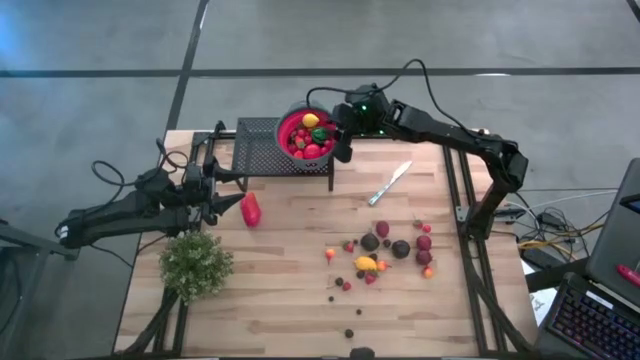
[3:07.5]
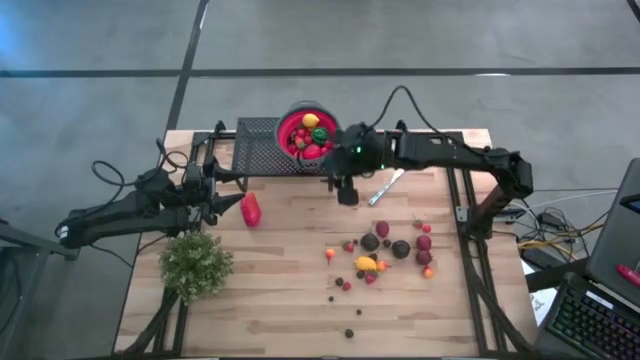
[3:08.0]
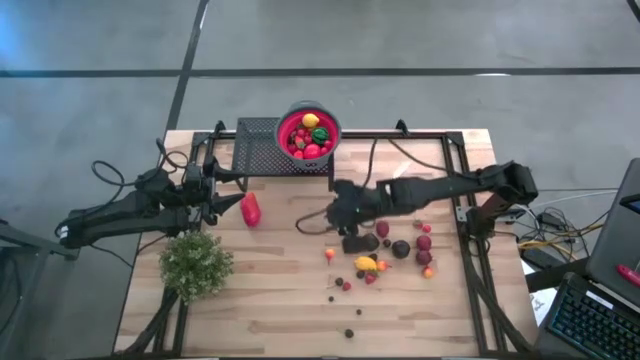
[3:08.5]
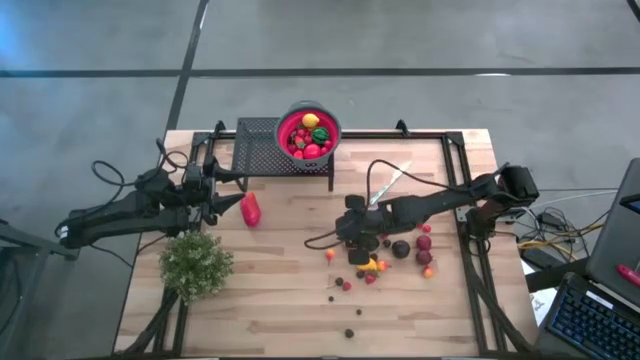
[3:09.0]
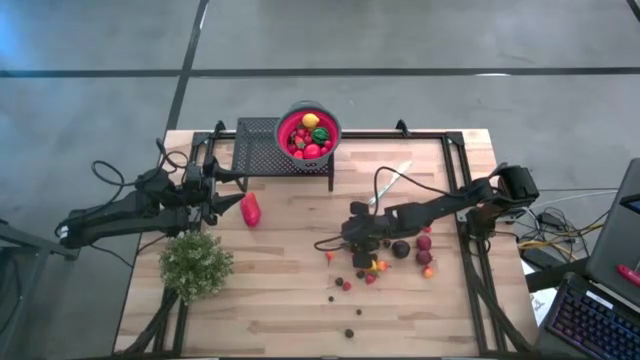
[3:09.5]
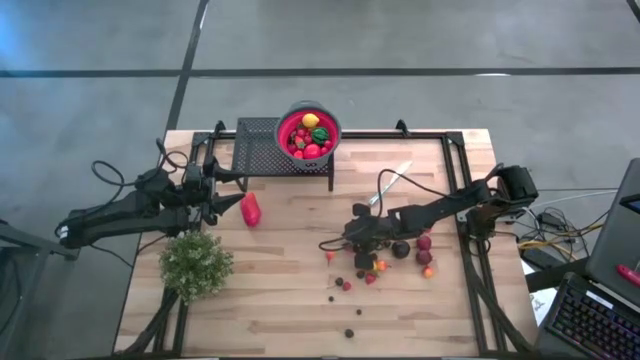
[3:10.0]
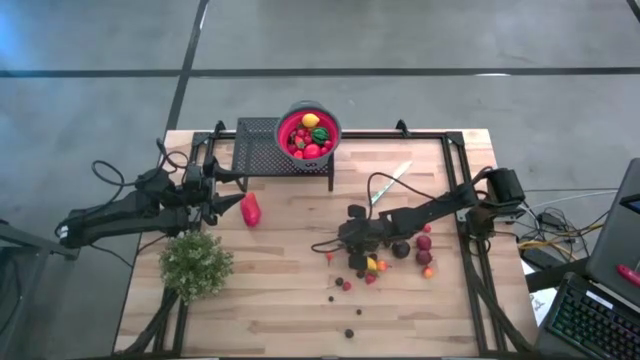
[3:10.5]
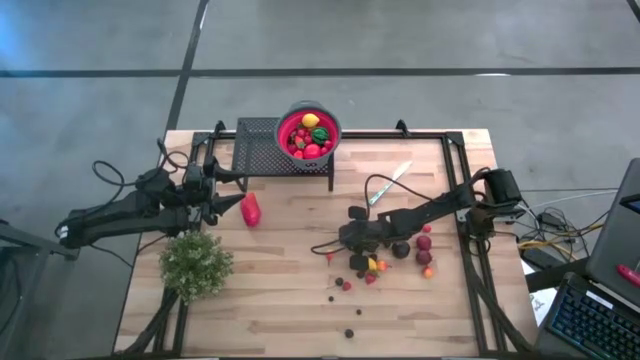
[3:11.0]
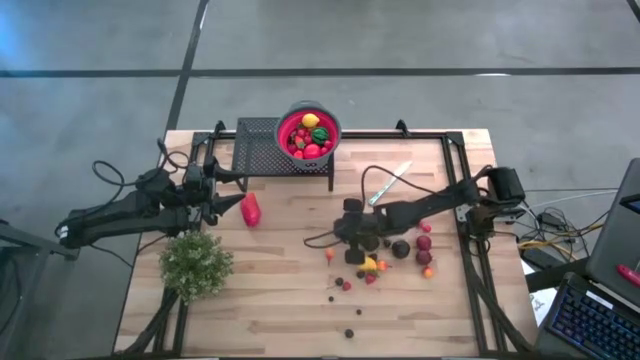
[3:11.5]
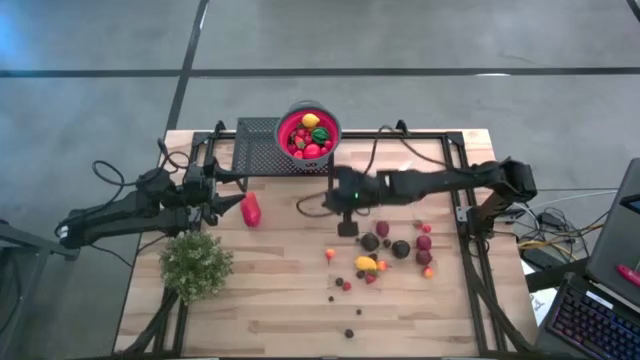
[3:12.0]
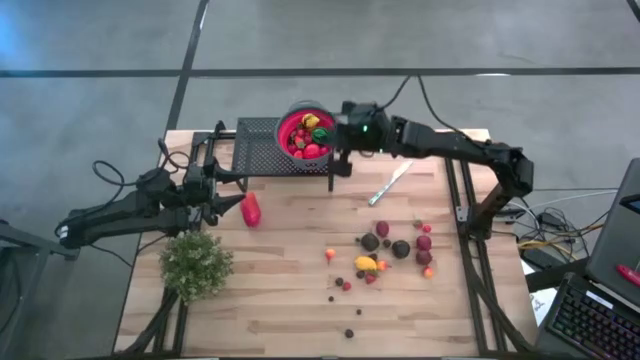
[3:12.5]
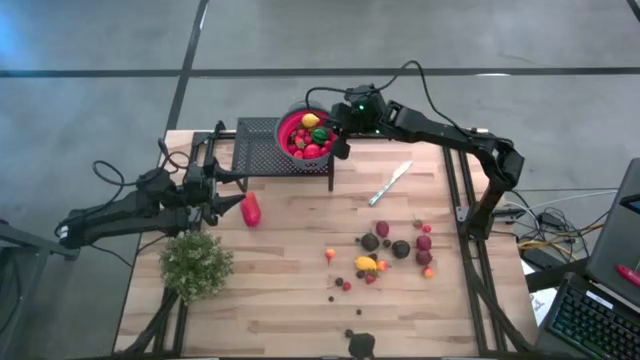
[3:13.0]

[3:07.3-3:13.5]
Task: Pick & Place Fruit
Put the red strawberry into the red gray strainer bowl on the shelf

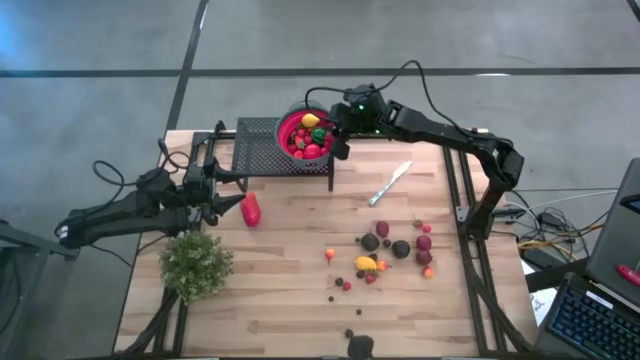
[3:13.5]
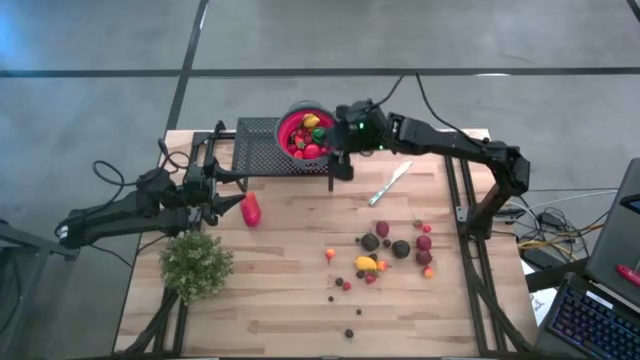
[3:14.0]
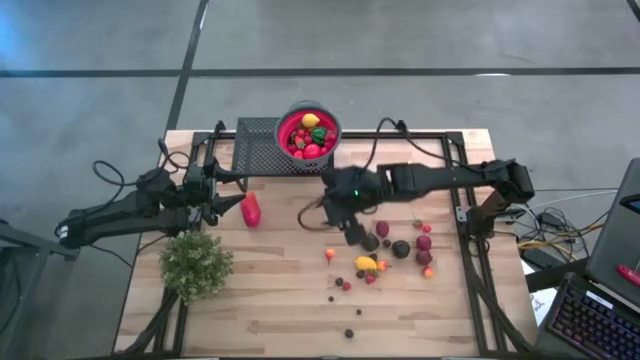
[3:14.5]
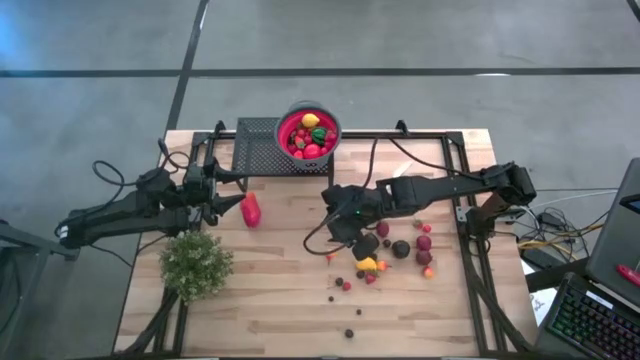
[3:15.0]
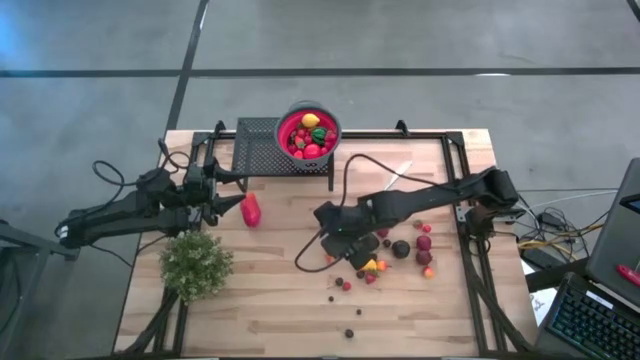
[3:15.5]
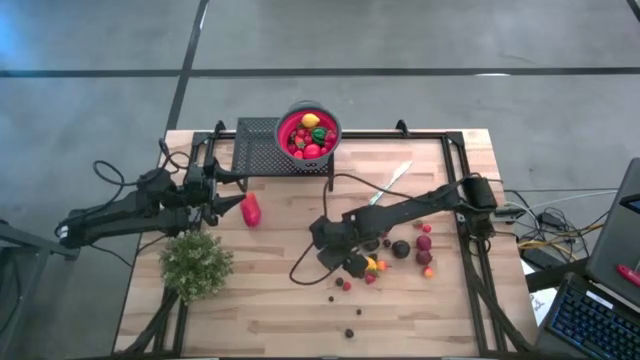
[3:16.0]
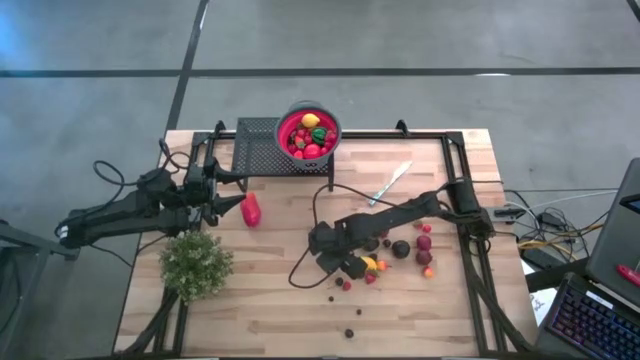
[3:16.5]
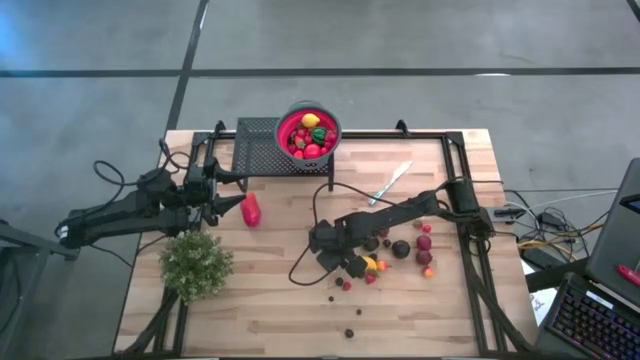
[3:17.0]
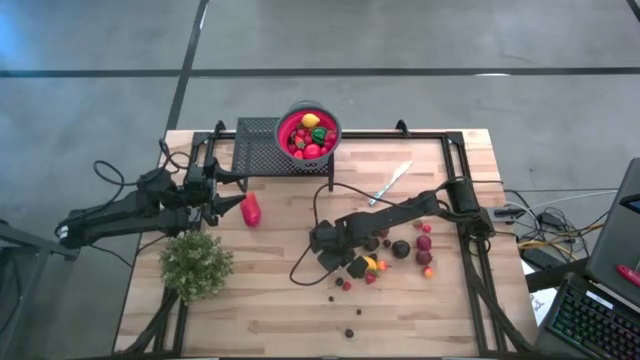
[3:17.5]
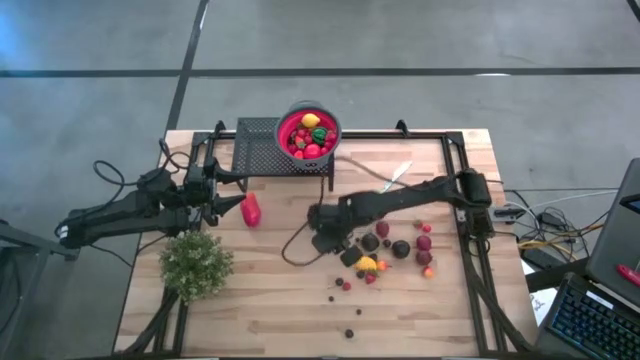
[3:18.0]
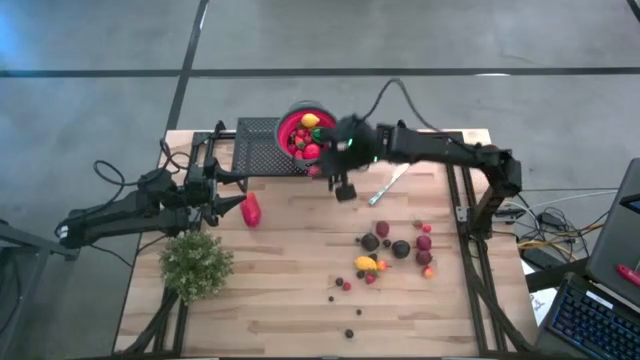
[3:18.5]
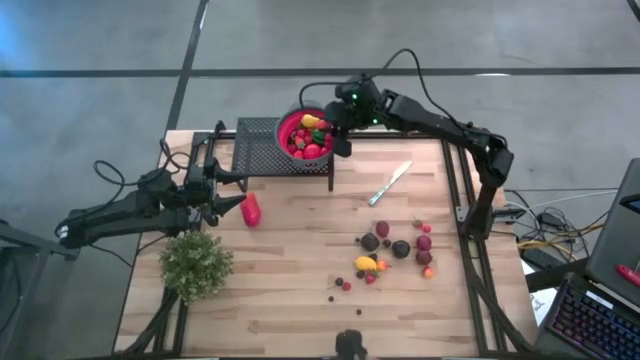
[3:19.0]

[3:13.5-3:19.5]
Put the orange pear into the red gray strainer bowl on the shelf

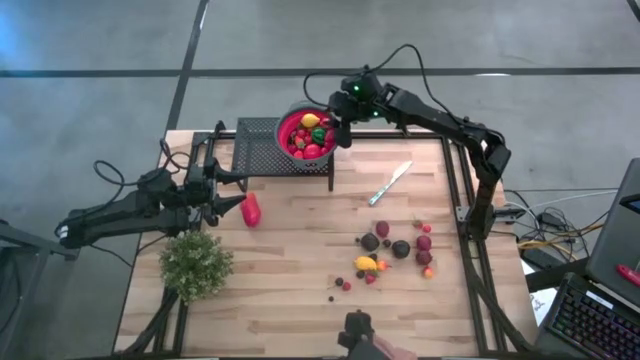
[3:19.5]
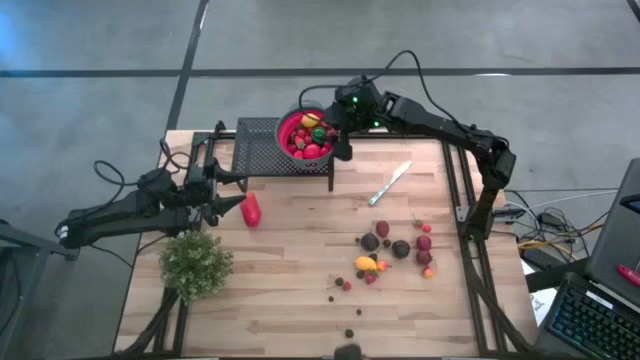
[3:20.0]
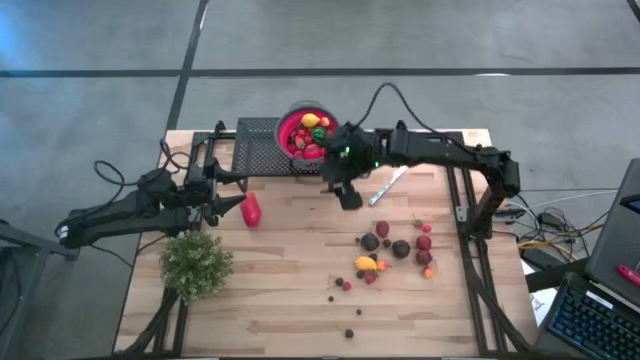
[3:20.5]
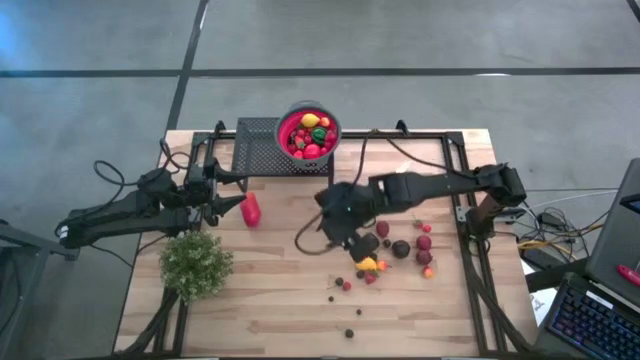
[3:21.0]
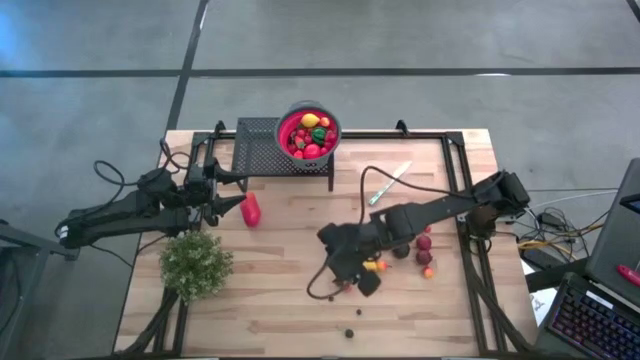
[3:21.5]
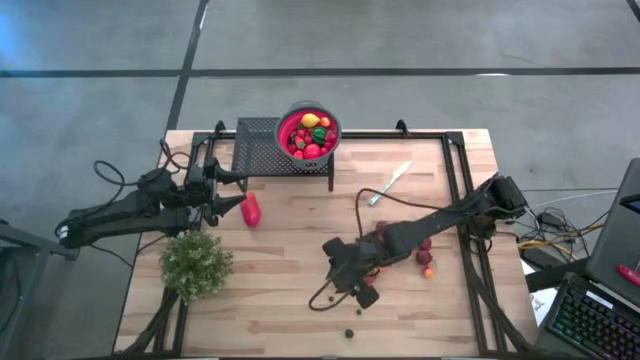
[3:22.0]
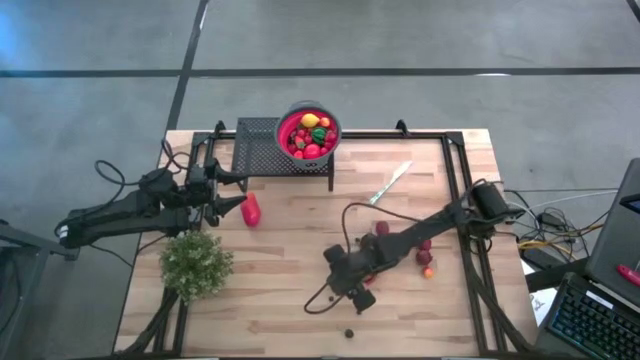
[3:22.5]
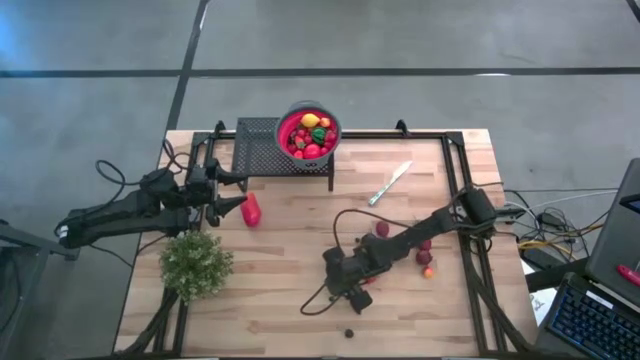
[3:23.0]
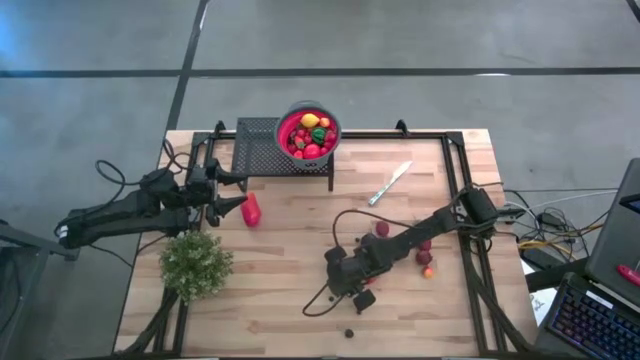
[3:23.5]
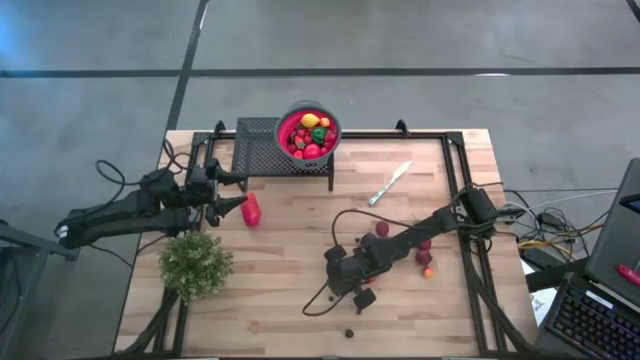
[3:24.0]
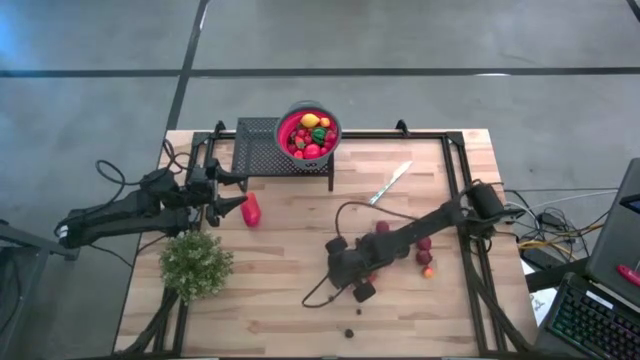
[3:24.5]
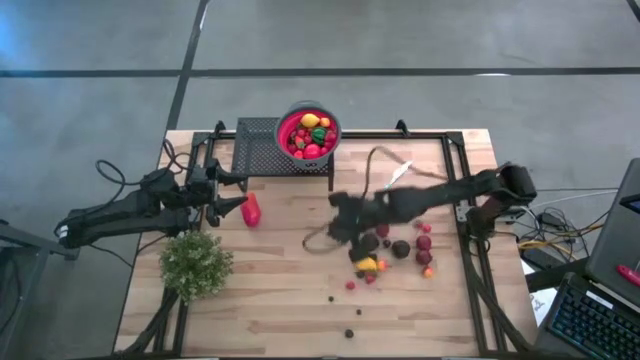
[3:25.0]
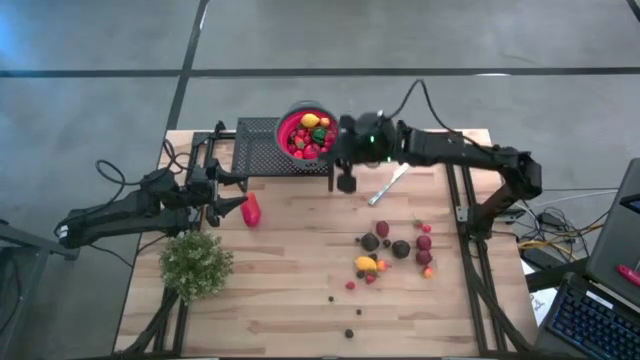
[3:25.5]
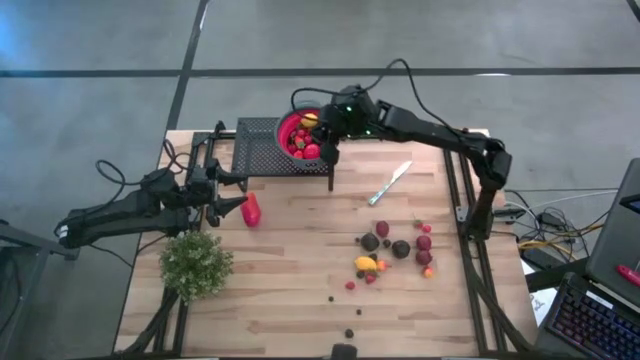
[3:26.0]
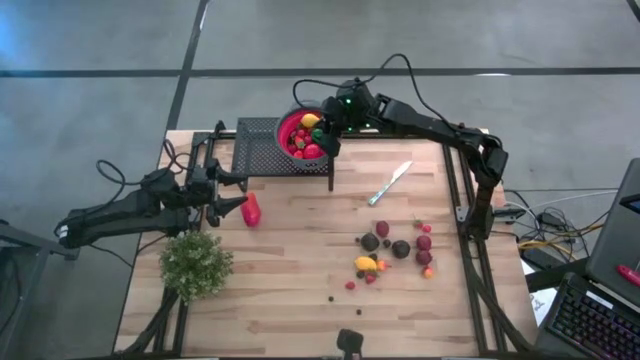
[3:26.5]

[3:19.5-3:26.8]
Put the black cherry into the red gray strainer bowl on the shelf
